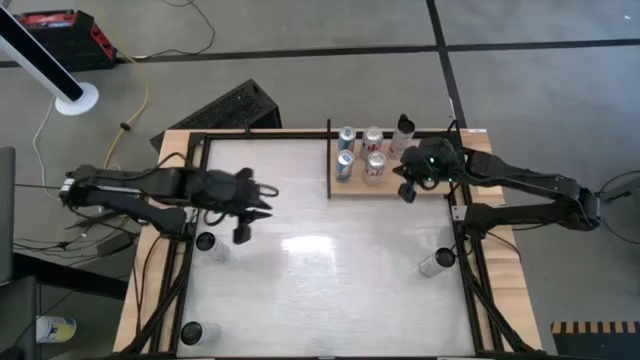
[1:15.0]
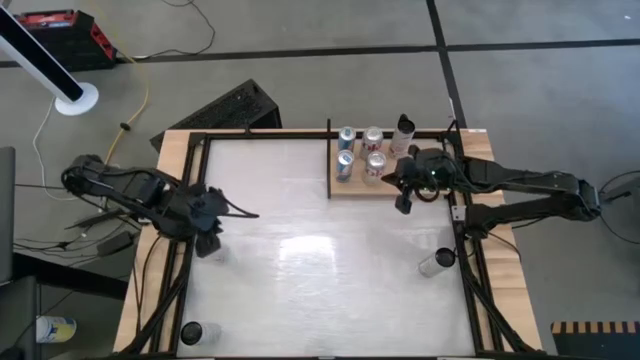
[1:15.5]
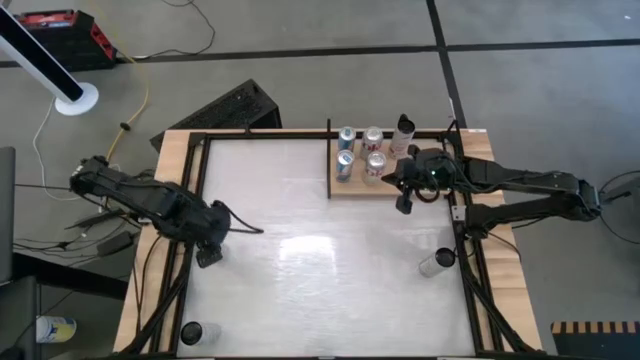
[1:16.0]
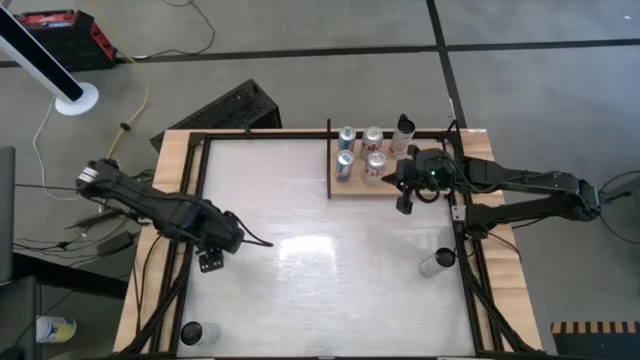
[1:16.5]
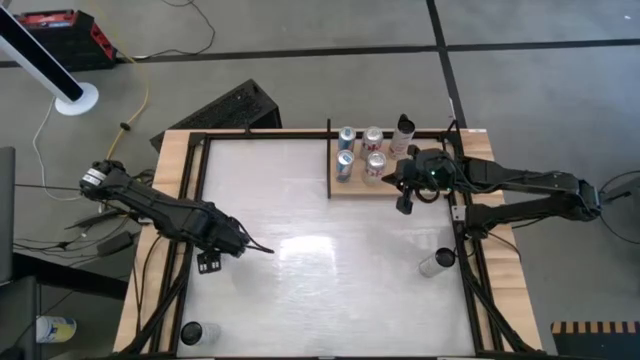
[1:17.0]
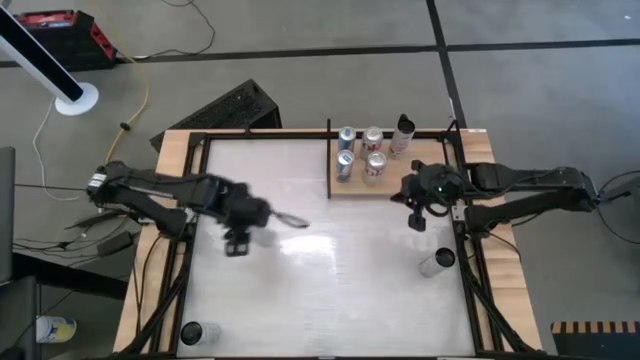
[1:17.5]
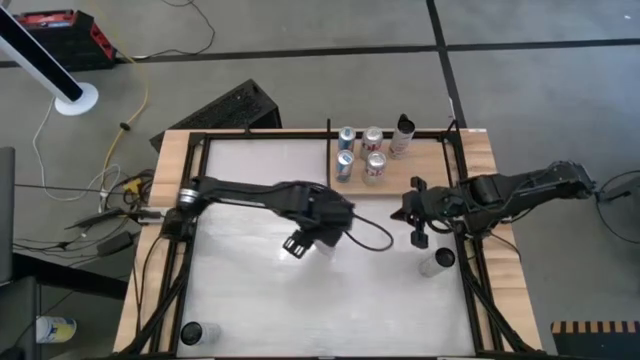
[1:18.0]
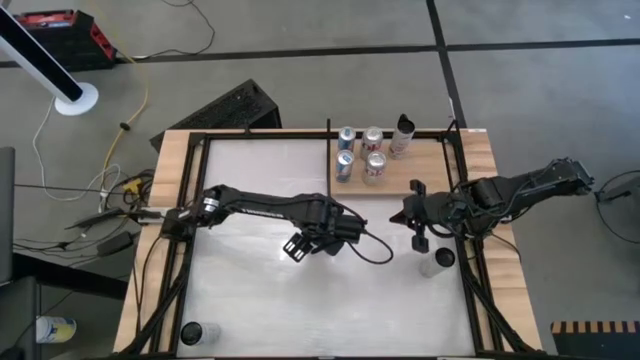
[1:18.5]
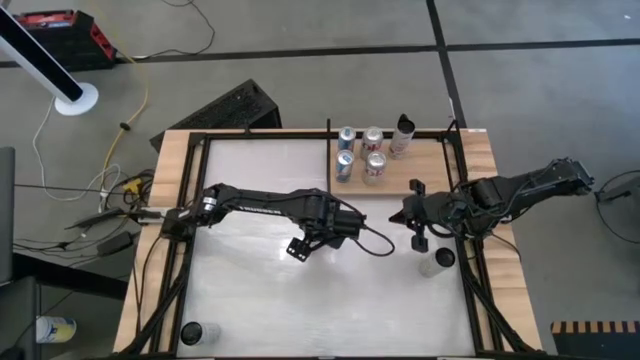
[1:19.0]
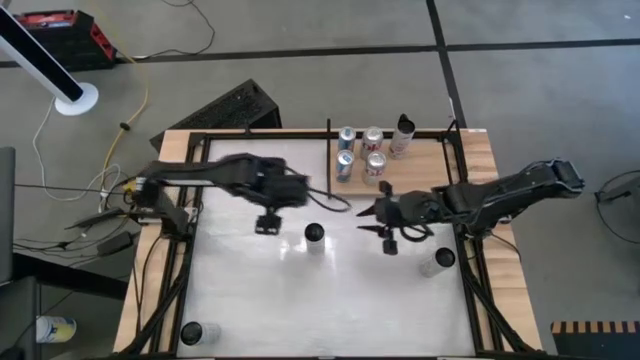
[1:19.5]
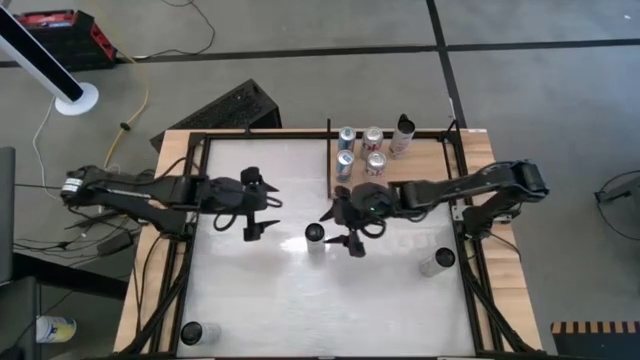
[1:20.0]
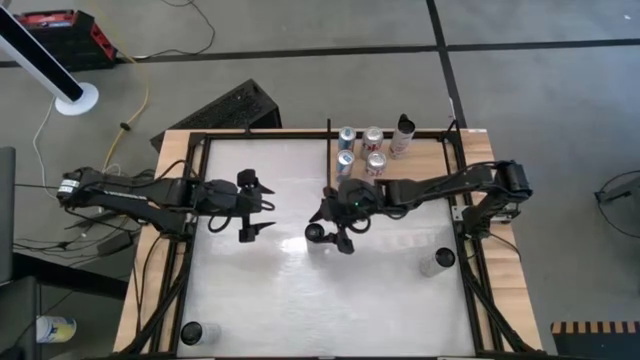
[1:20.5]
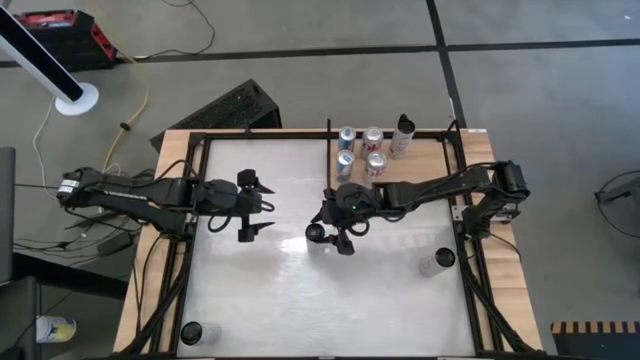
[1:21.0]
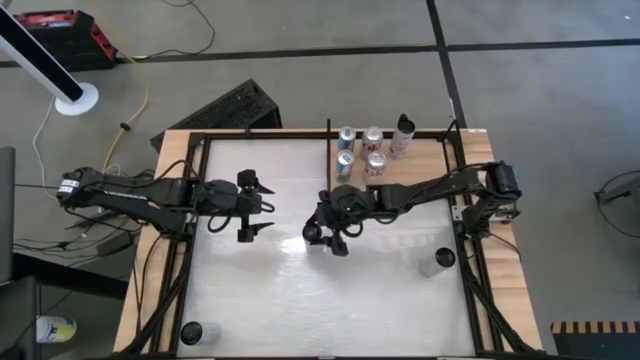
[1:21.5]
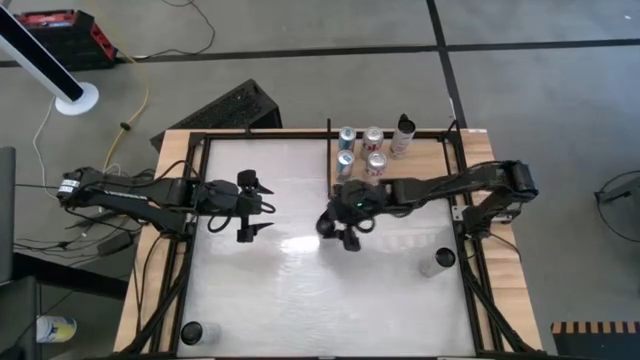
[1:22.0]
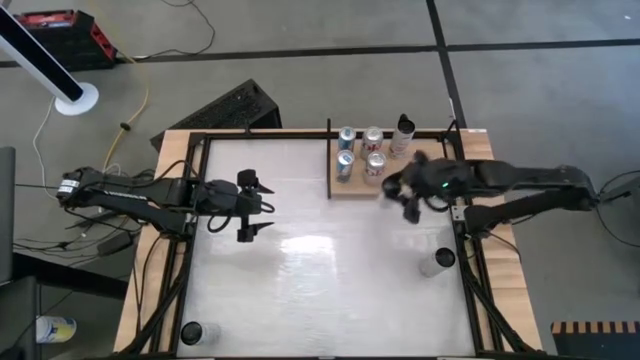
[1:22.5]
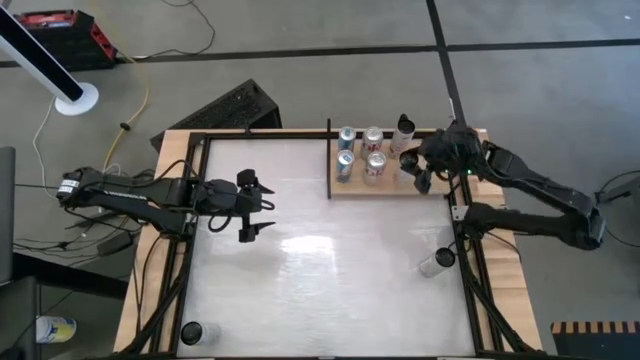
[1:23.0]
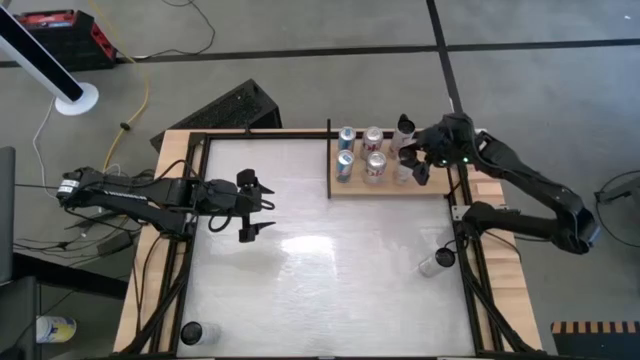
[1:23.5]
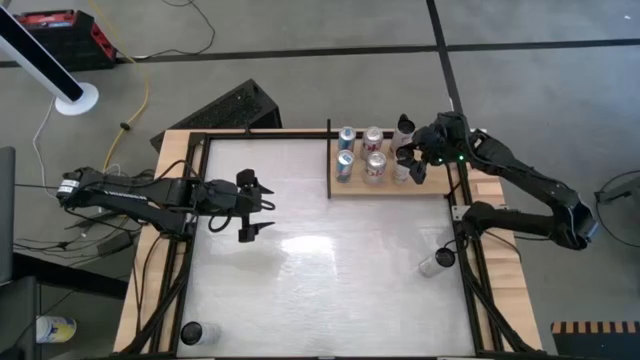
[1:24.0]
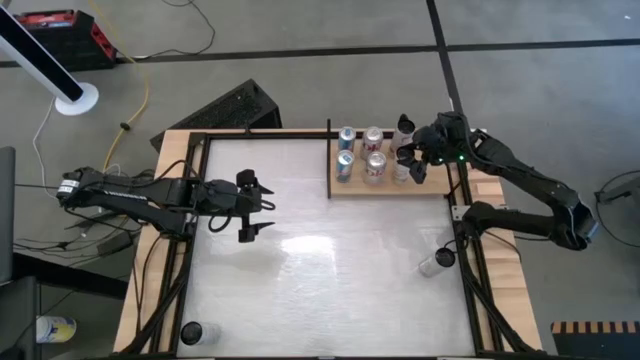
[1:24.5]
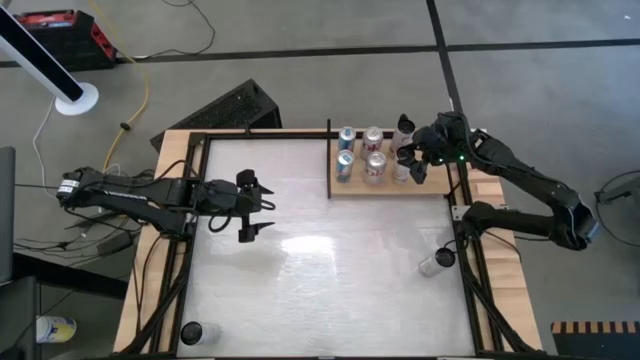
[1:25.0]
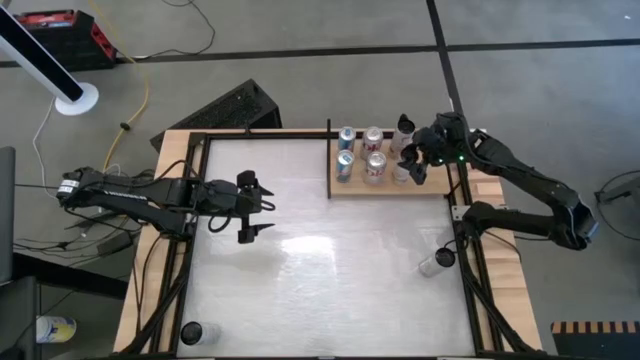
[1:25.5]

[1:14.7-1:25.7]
Task: Place canned beverage on shelf
Put the white-pink soda can on the shelf aligned with the other white-pink soda can

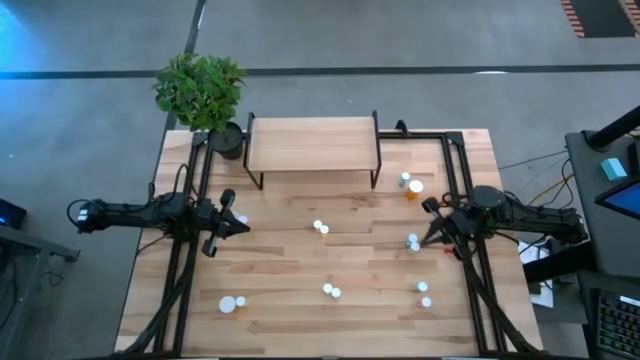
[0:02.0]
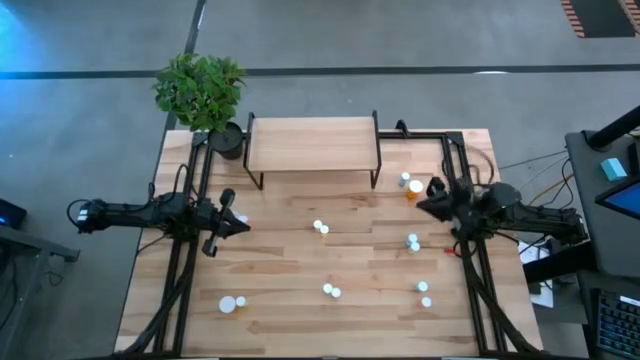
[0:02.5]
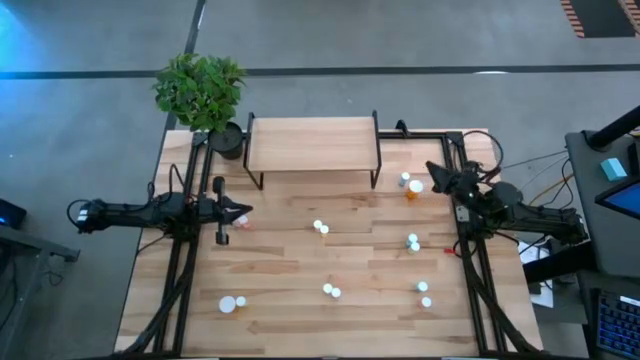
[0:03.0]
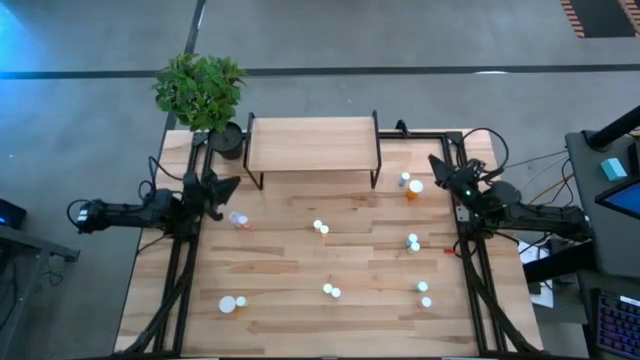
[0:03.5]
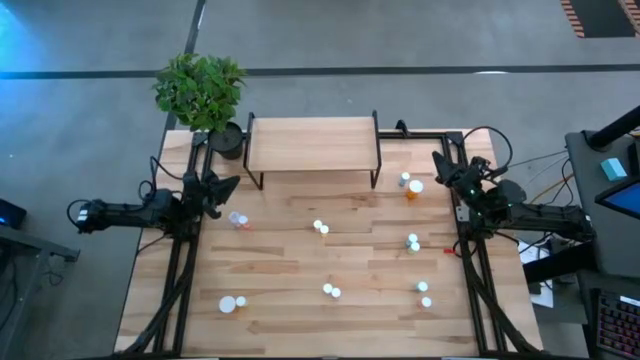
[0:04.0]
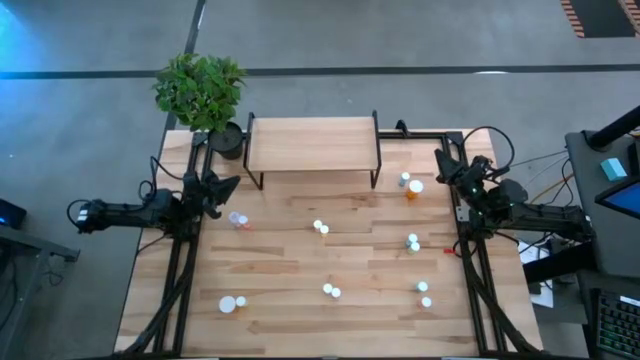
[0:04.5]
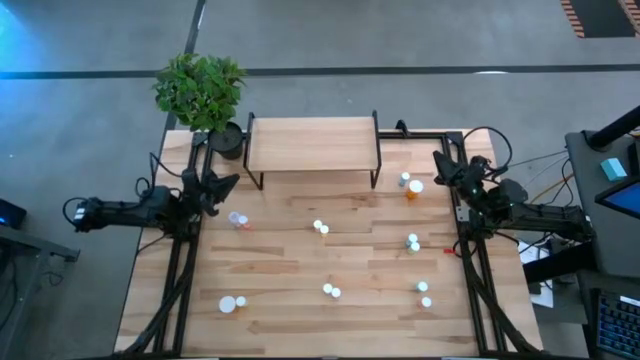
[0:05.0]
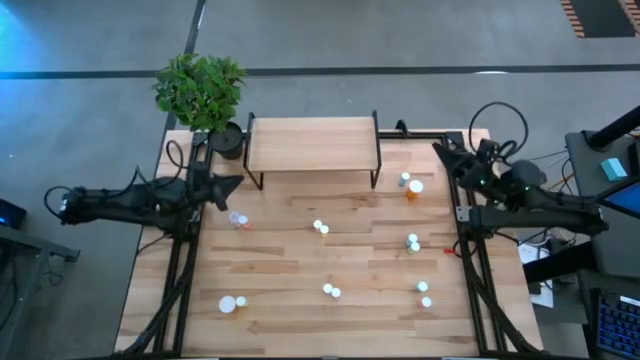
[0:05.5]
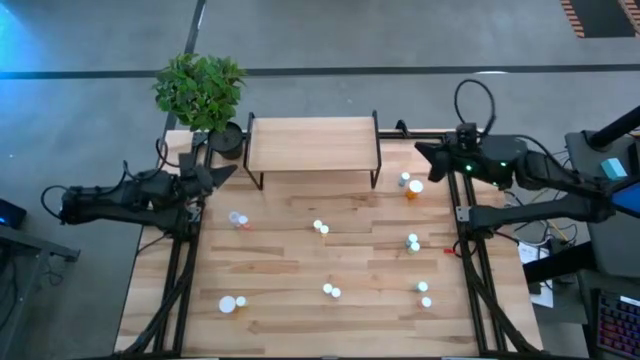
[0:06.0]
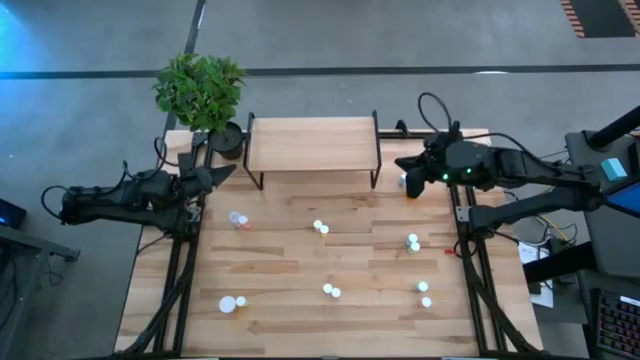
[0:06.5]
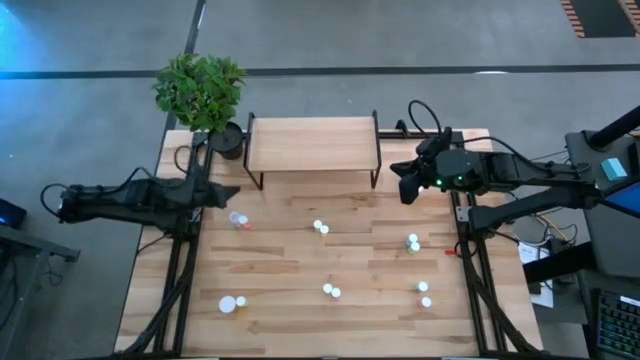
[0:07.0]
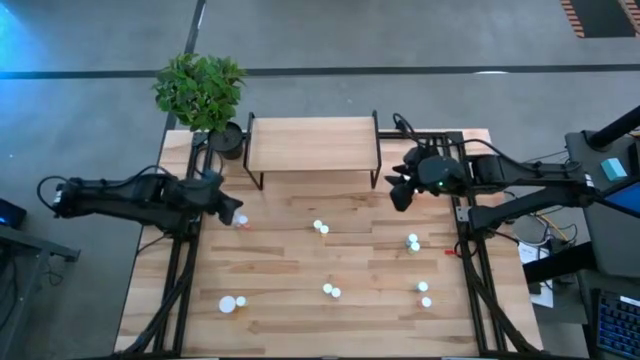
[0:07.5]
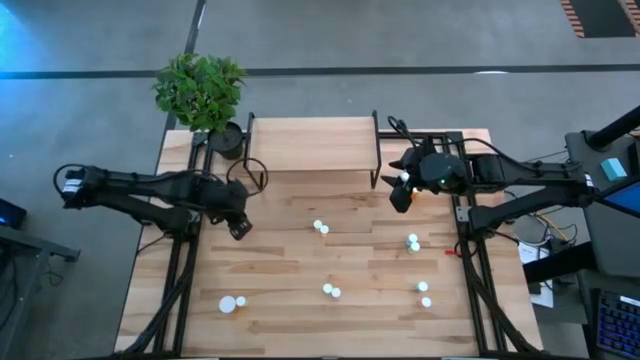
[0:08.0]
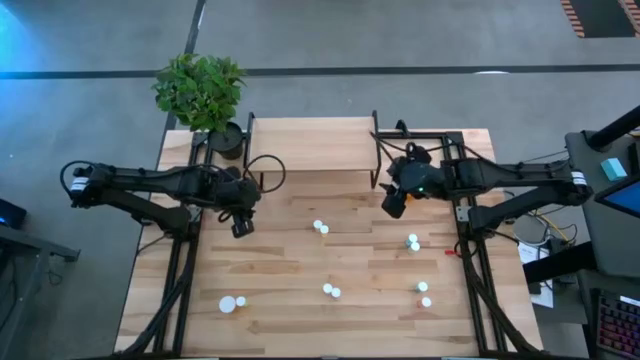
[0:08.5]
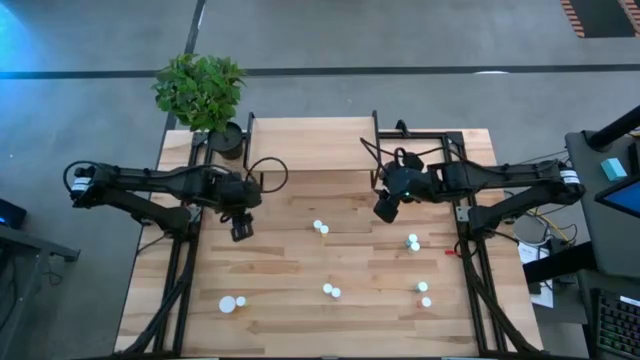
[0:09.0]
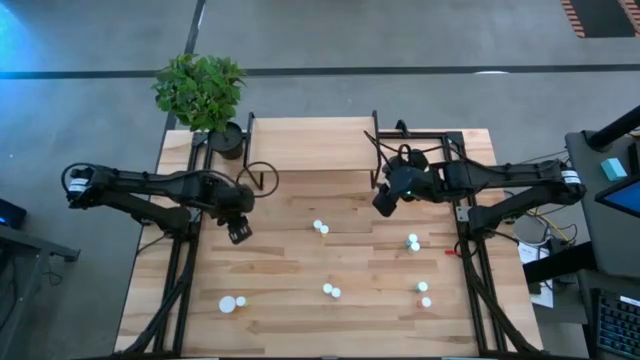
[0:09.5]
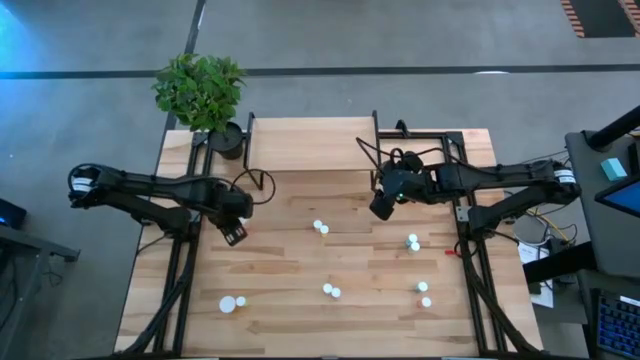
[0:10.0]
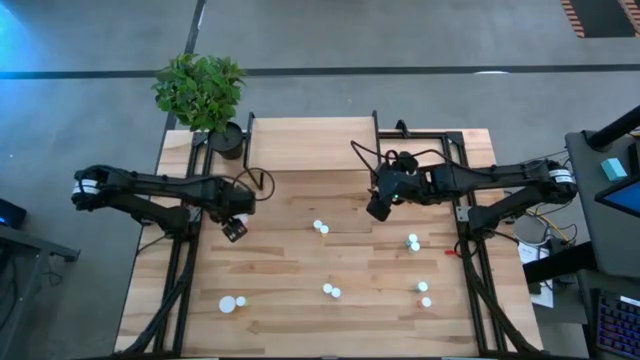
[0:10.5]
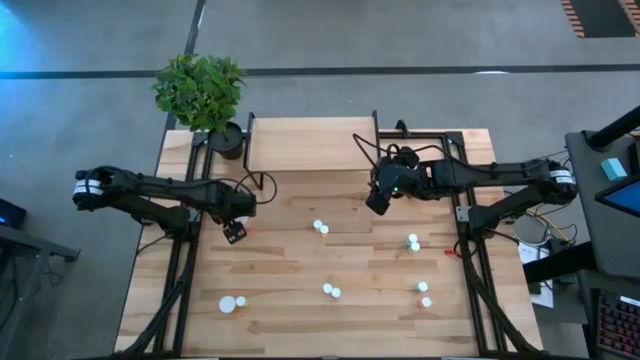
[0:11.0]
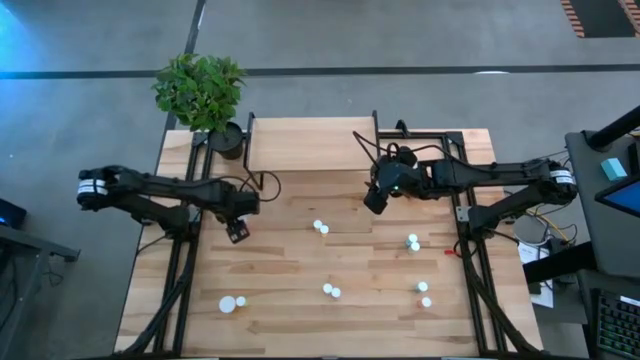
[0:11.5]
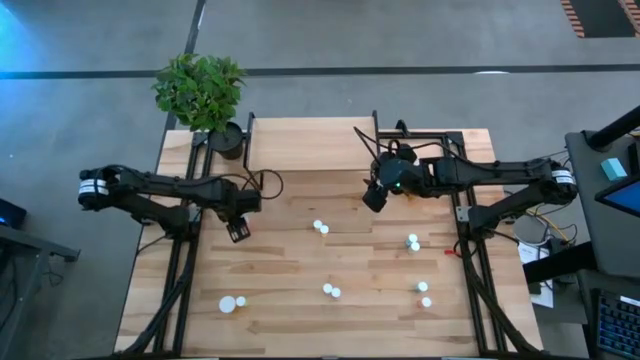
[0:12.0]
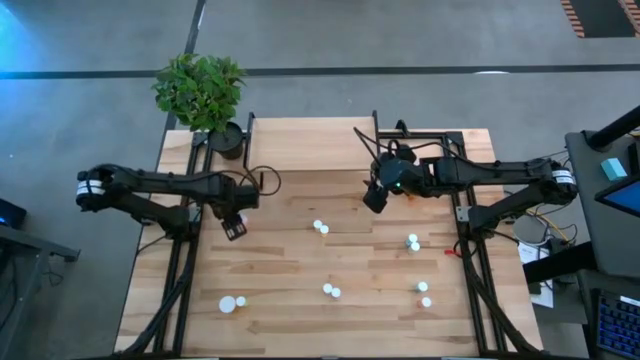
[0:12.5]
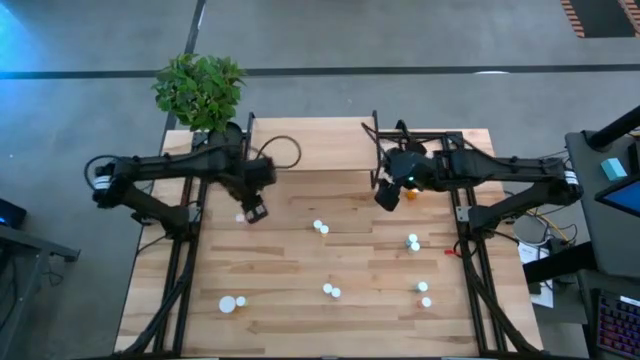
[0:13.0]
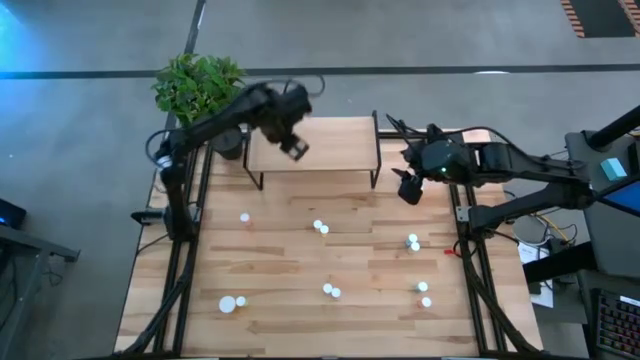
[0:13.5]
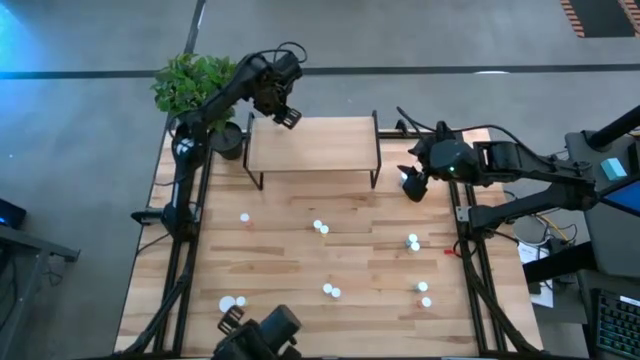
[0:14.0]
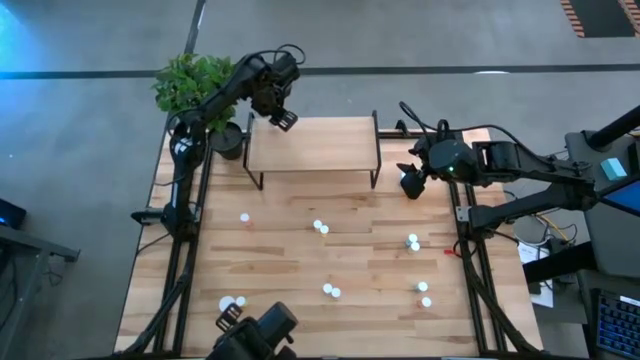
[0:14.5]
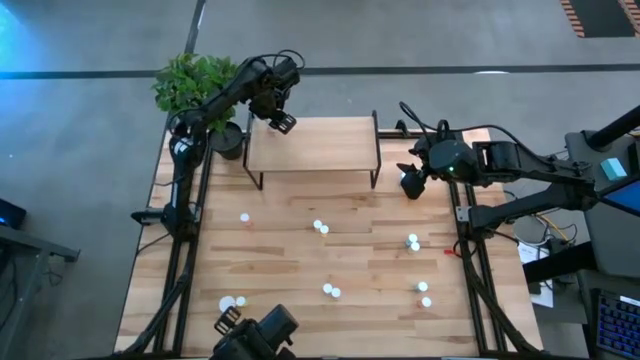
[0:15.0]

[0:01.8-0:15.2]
Task: Pick and place medicine bottles onto shelf by color
Put the transparent pill bottle on the shelf
